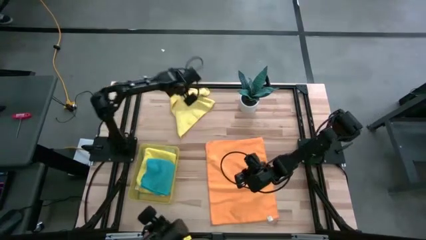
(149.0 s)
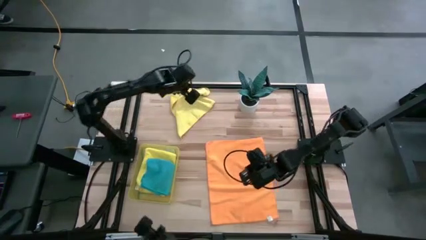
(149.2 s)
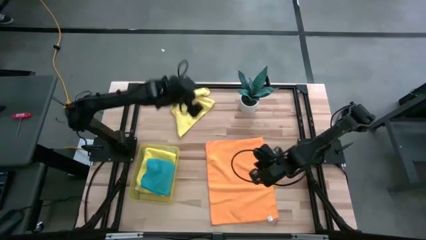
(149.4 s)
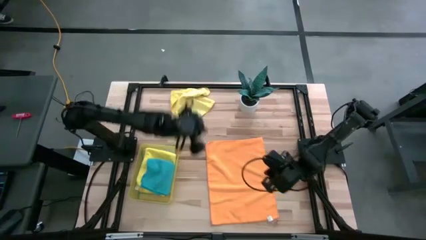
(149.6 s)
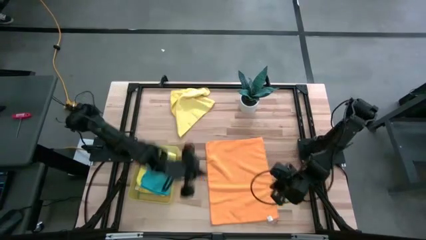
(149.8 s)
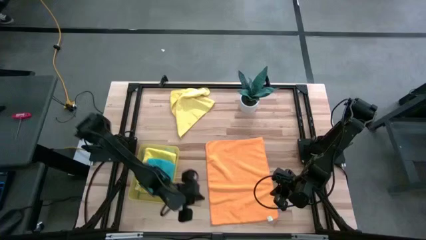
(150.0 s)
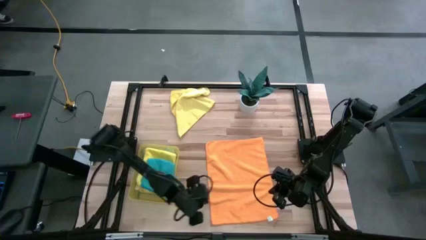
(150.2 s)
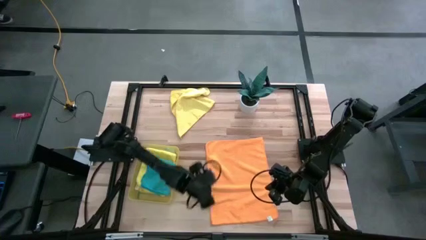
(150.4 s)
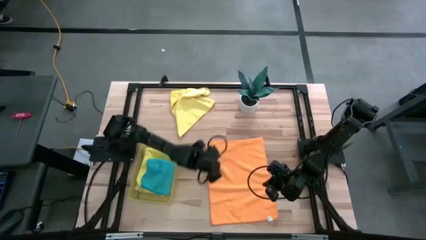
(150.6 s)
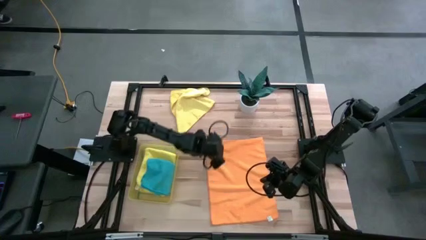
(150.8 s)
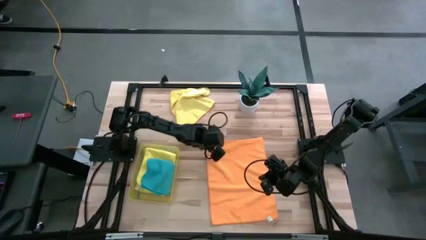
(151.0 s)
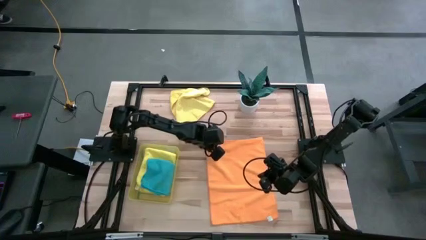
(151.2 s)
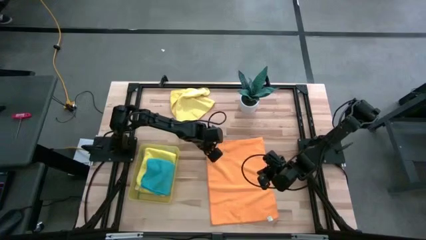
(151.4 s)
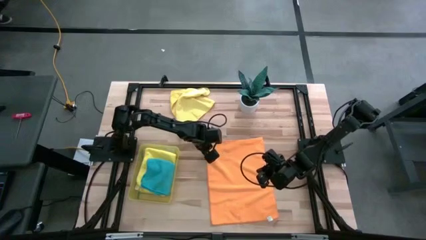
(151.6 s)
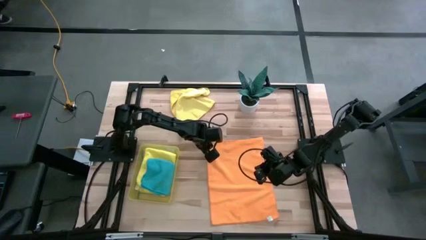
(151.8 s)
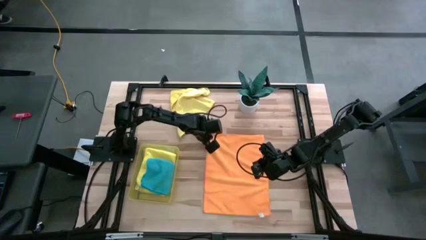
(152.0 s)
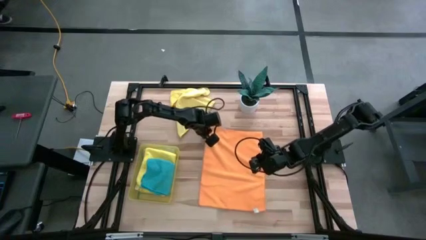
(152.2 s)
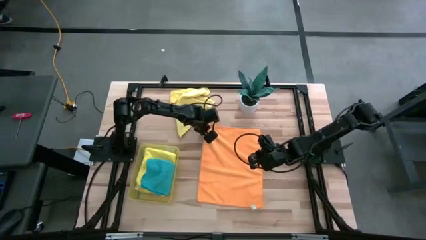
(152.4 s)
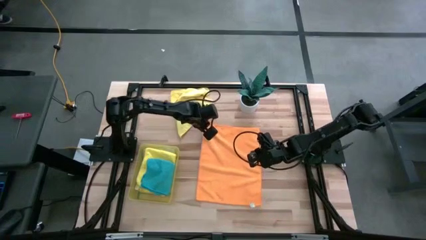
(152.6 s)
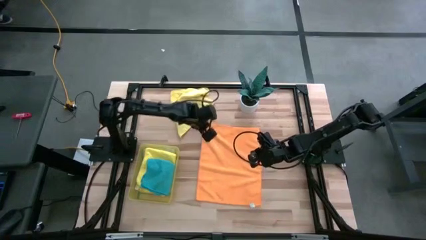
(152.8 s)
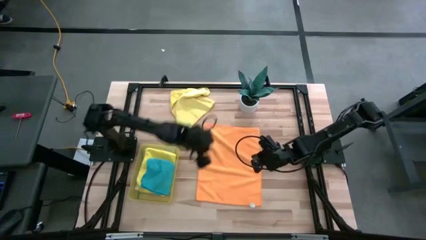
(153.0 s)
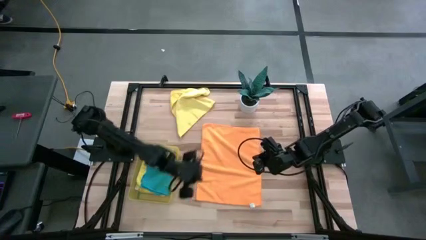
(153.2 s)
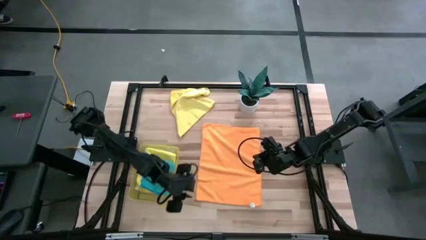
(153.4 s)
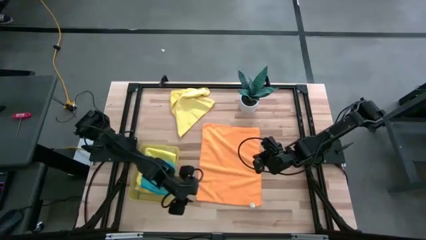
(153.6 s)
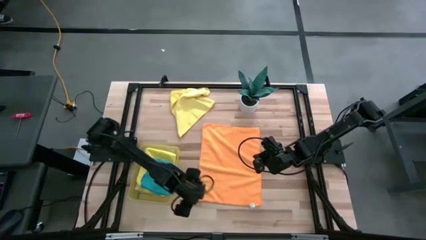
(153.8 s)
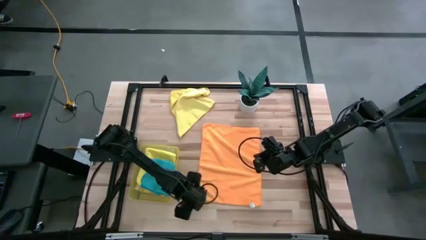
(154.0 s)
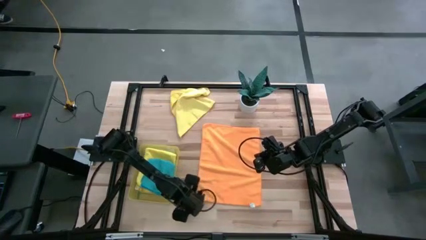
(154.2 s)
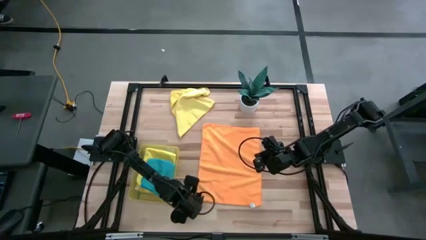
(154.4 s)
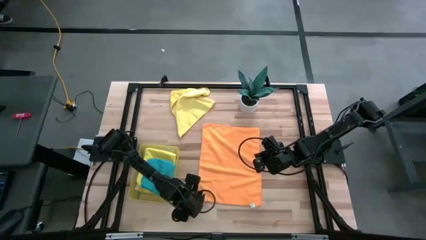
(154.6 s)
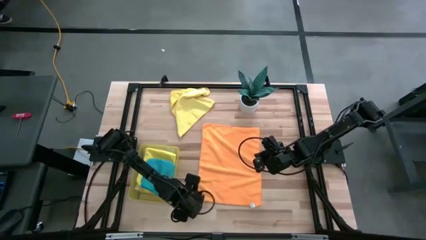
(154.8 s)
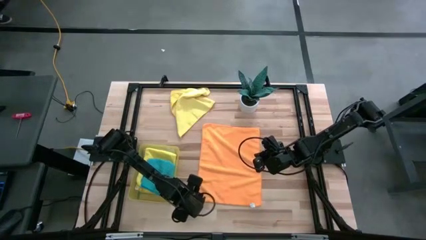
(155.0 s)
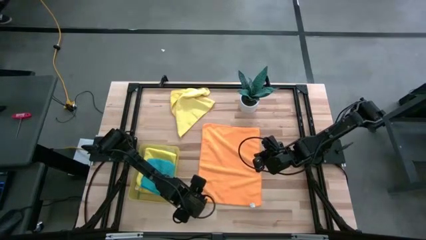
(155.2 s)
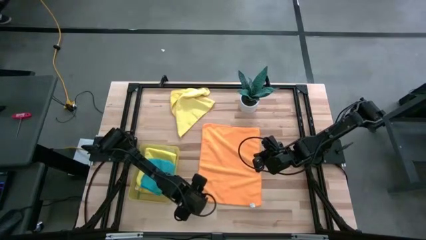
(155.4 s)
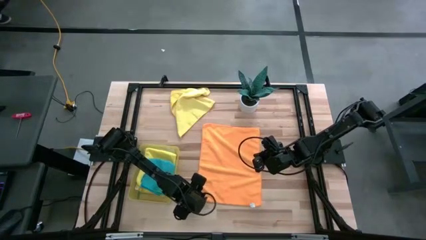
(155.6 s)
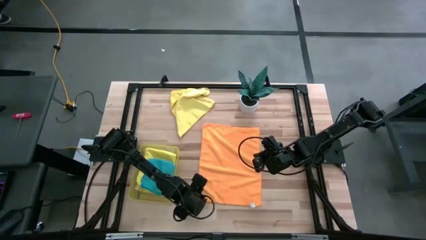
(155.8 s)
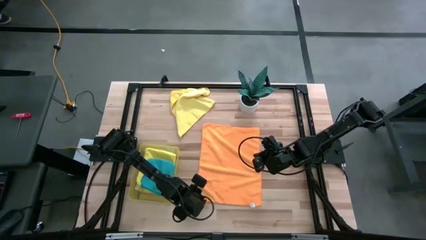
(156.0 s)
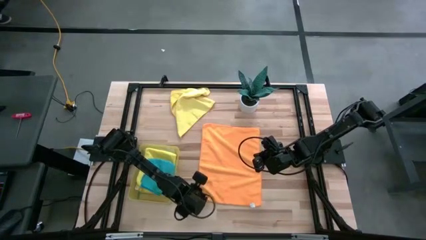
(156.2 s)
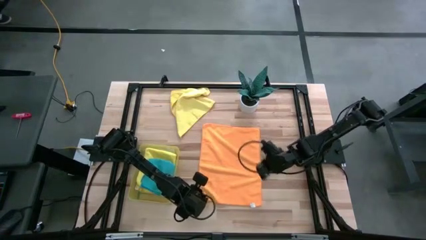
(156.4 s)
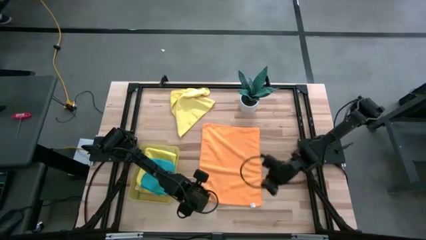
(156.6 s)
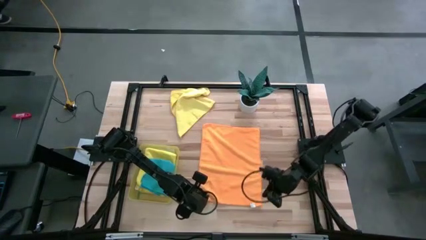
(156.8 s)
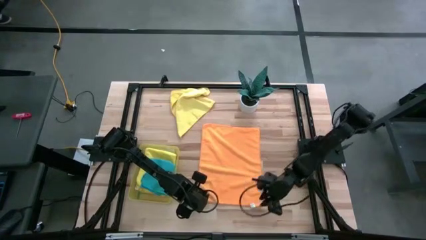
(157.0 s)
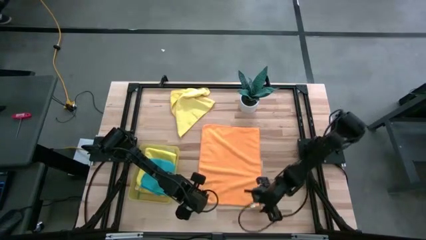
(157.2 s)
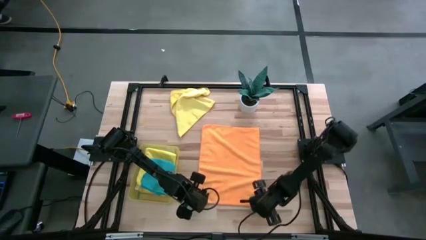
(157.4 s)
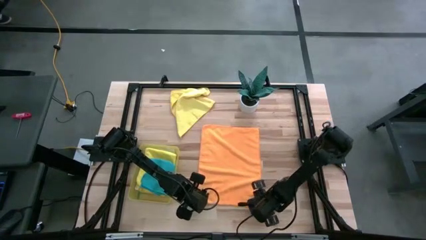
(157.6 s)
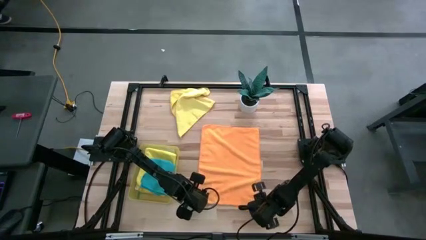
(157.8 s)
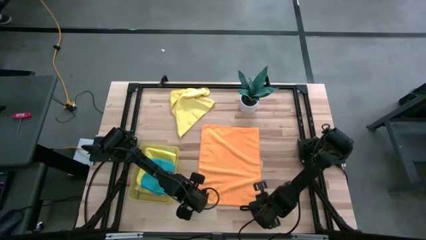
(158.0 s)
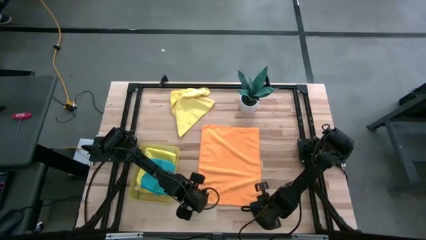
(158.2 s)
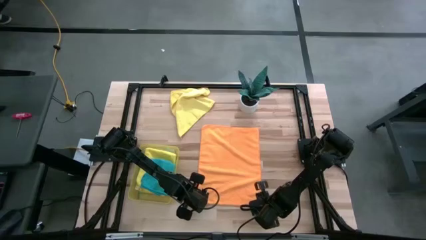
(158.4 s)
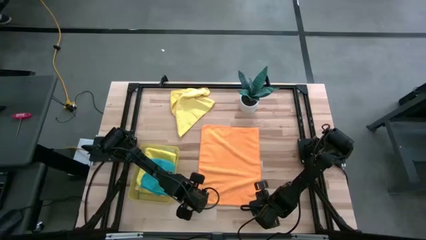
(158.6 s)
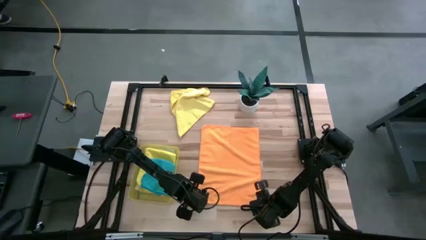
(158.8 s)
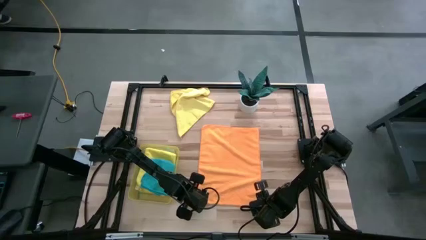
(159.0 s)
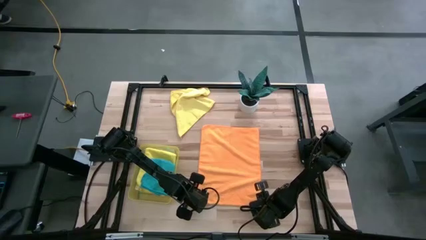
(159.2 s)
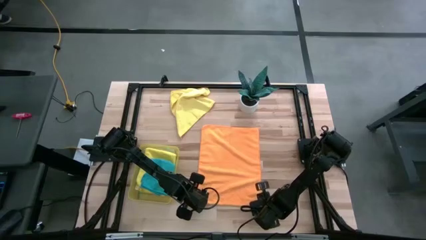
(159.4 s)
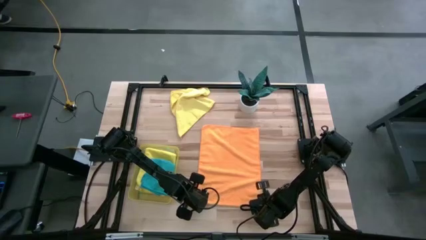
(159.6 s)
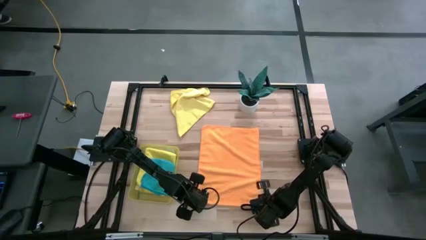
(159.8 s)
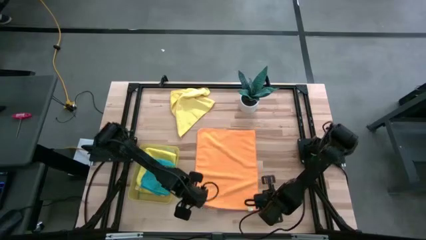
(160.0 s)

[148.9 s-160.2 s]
Task: Fold microfiber towels
Fold the orange microfiber cloth
